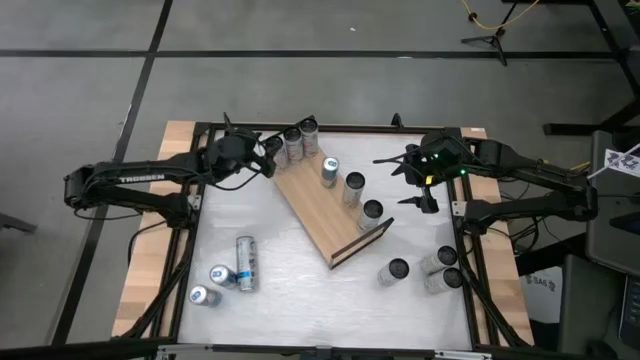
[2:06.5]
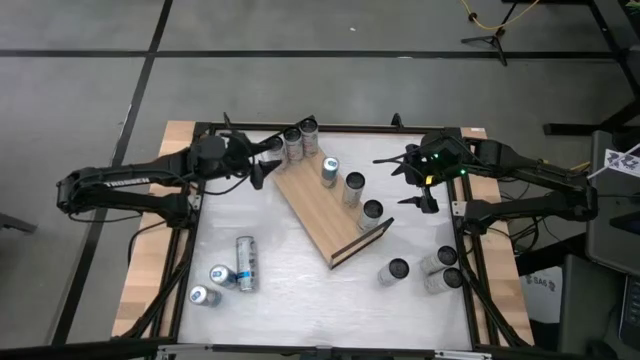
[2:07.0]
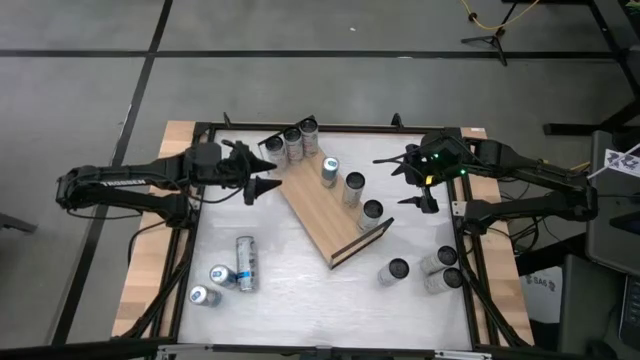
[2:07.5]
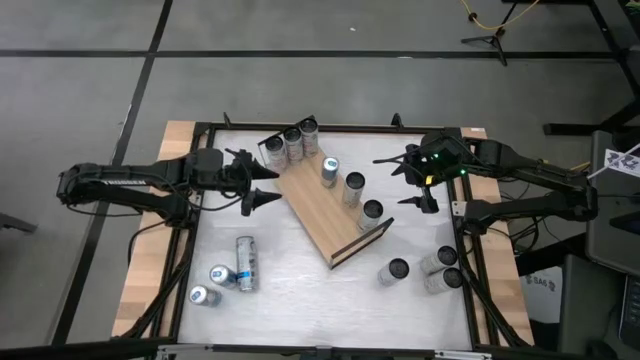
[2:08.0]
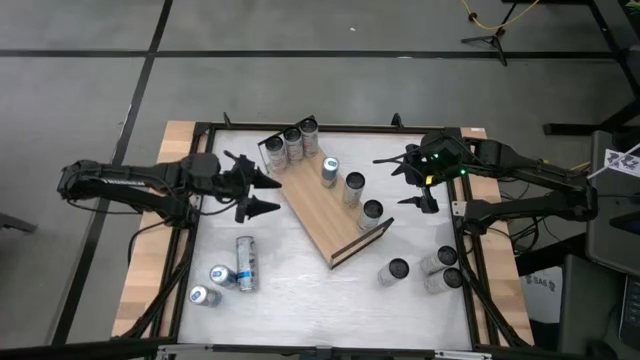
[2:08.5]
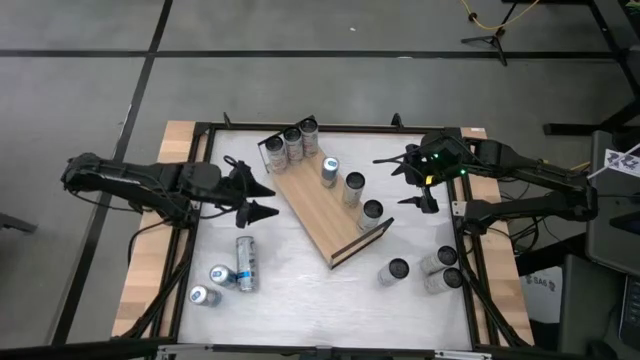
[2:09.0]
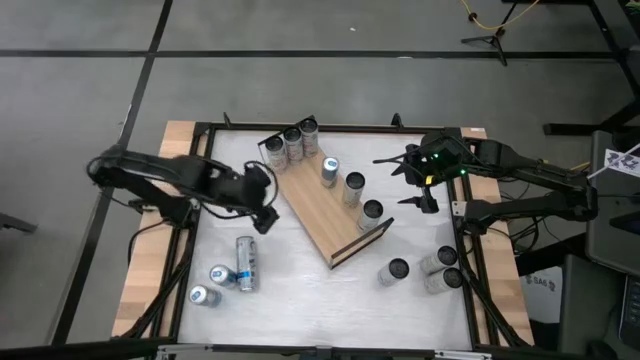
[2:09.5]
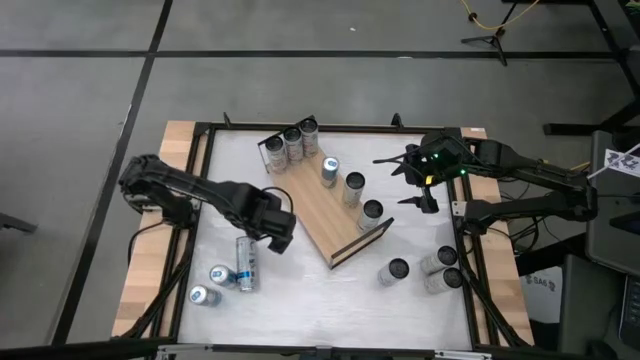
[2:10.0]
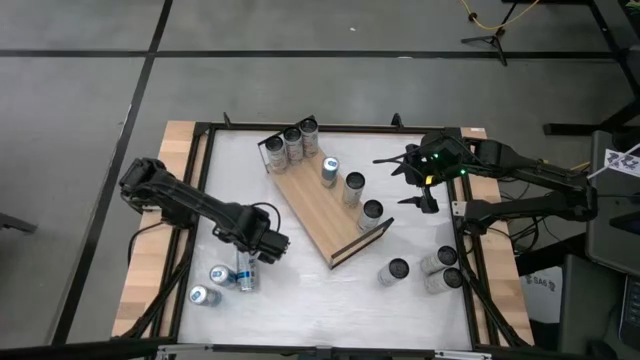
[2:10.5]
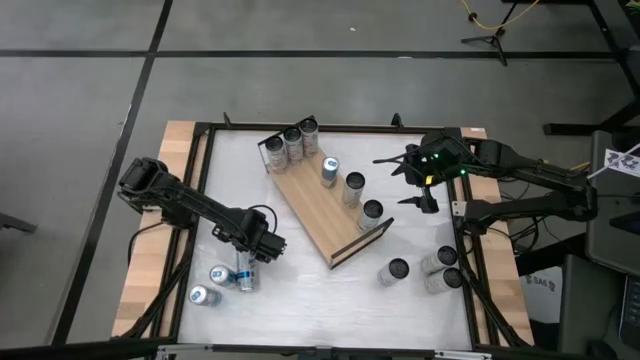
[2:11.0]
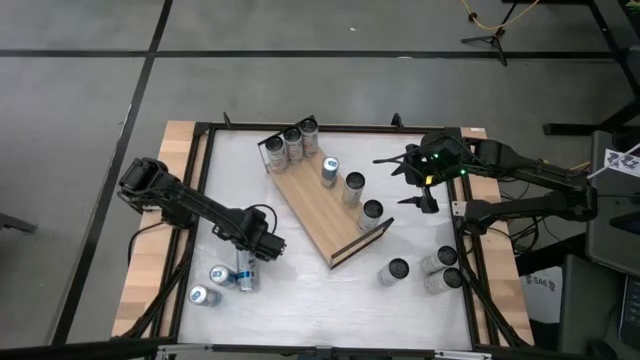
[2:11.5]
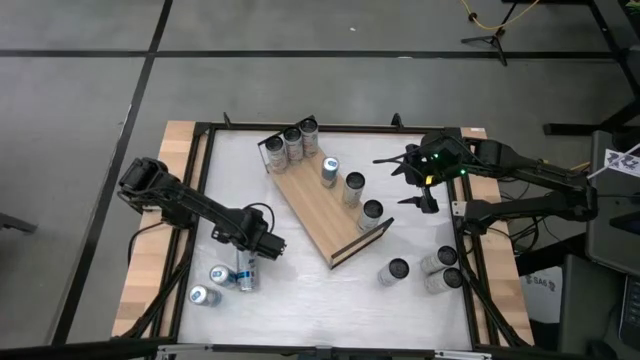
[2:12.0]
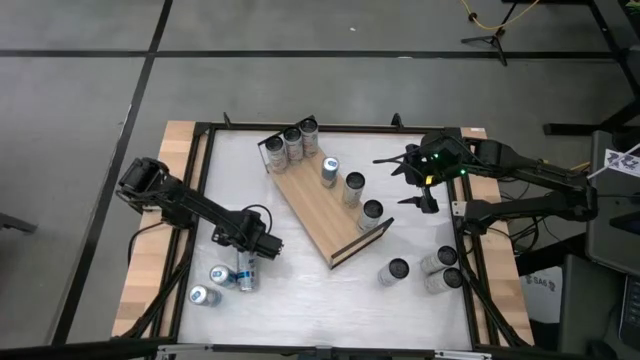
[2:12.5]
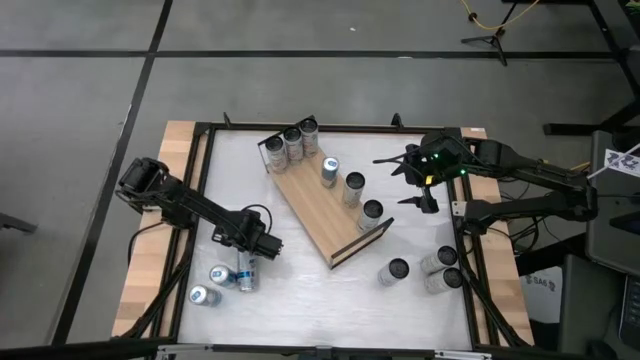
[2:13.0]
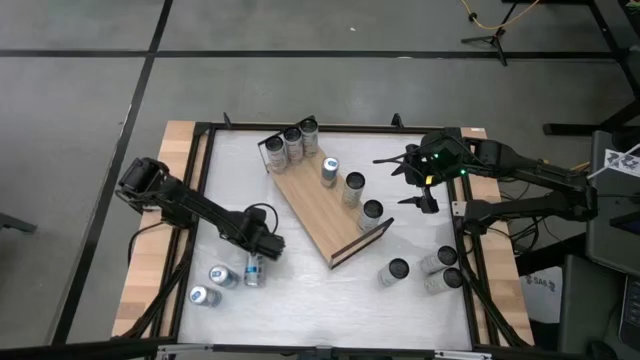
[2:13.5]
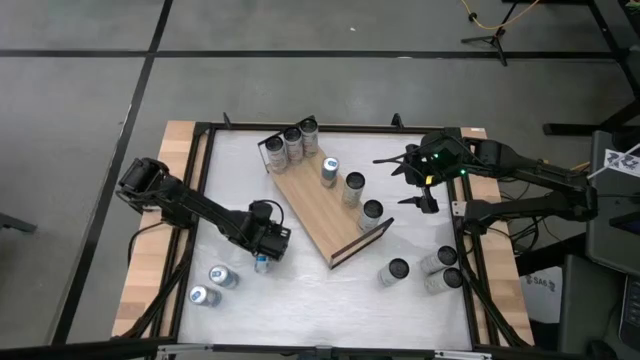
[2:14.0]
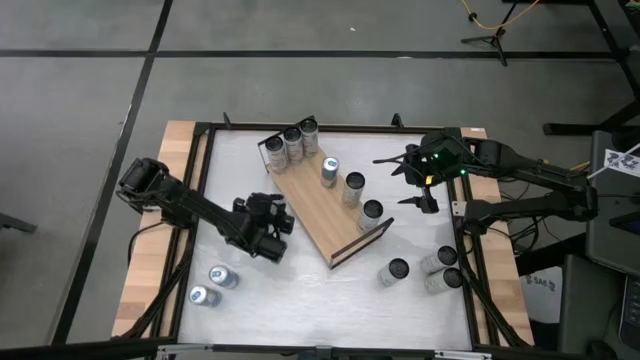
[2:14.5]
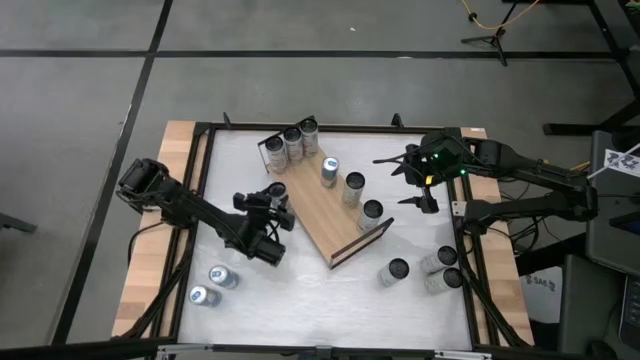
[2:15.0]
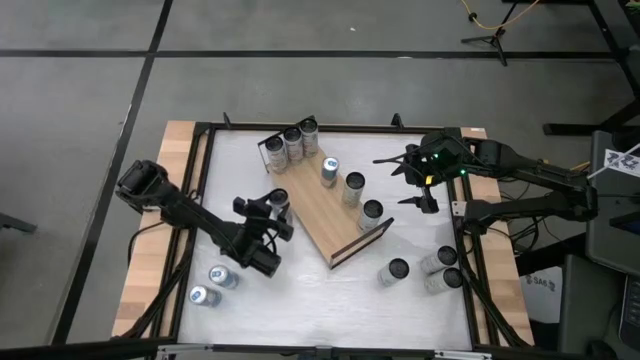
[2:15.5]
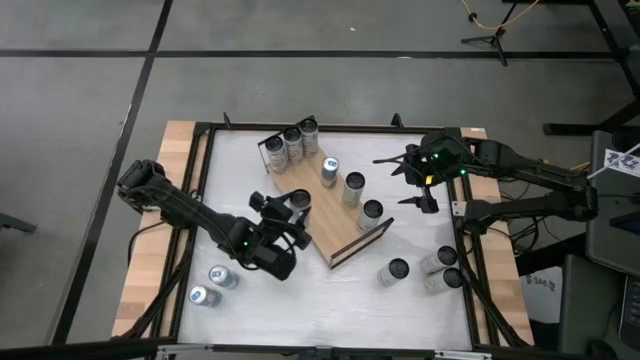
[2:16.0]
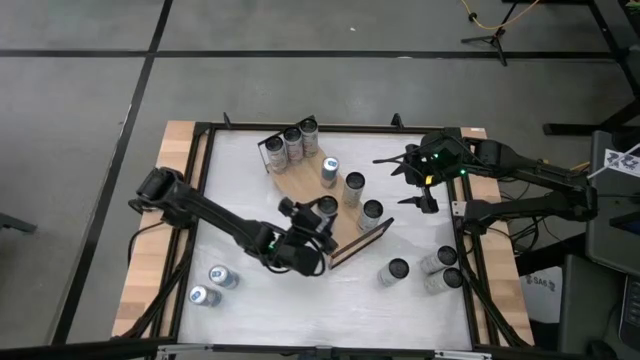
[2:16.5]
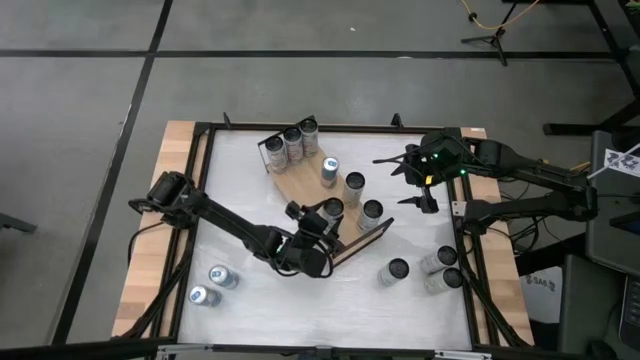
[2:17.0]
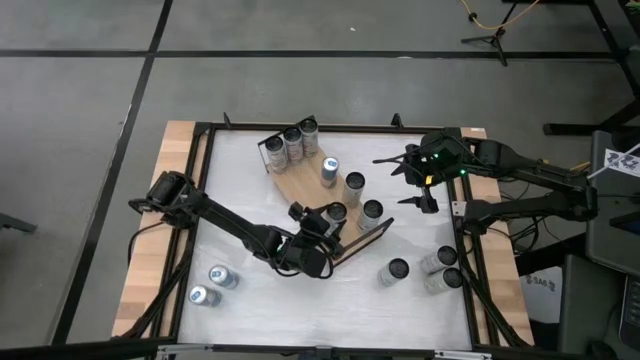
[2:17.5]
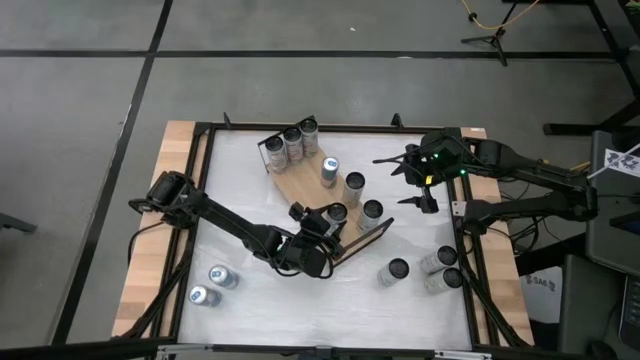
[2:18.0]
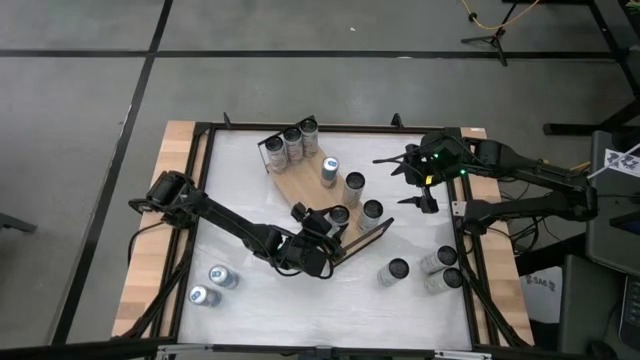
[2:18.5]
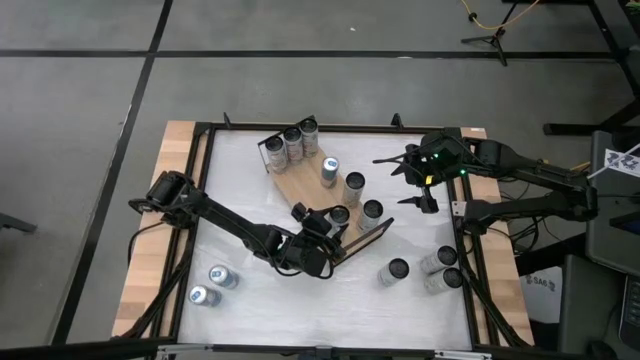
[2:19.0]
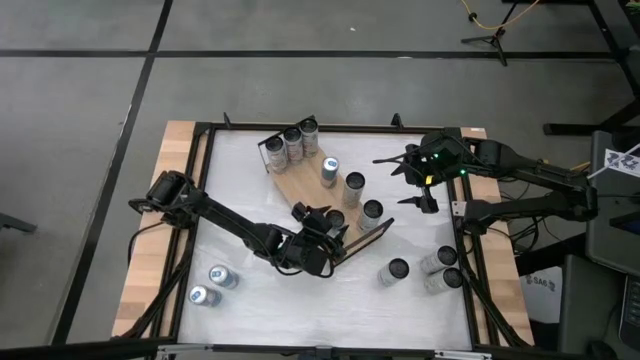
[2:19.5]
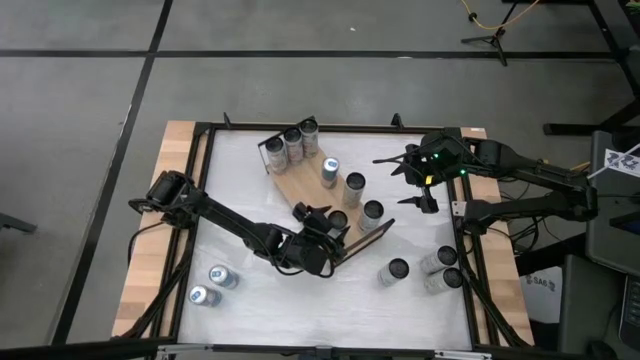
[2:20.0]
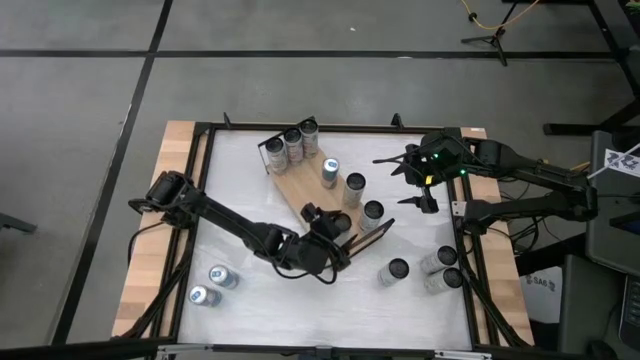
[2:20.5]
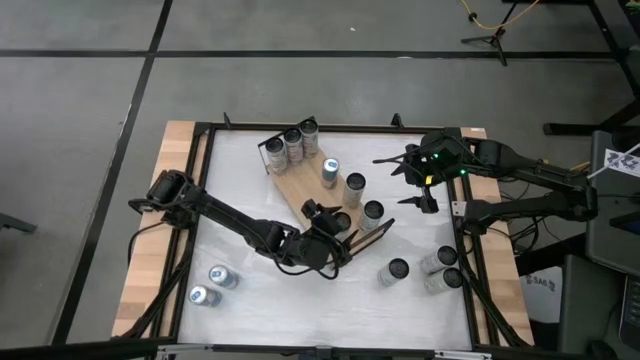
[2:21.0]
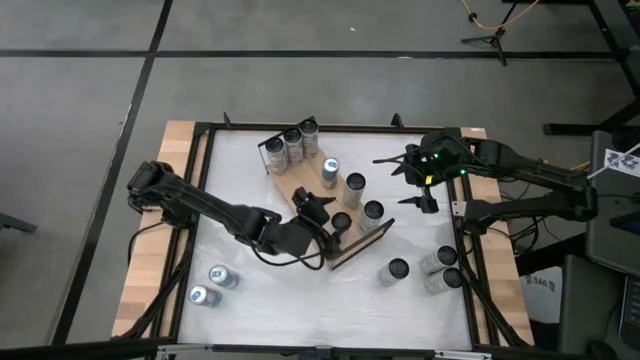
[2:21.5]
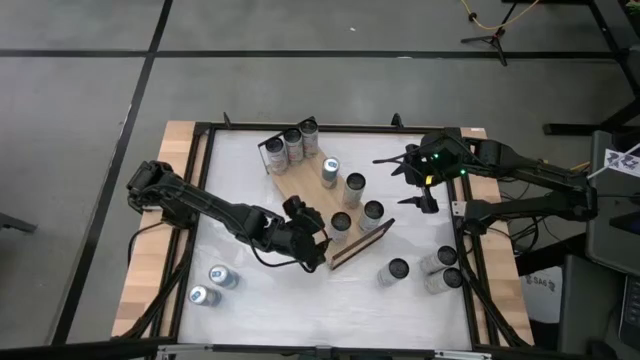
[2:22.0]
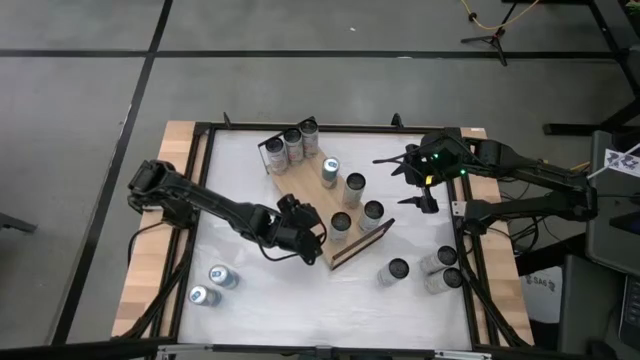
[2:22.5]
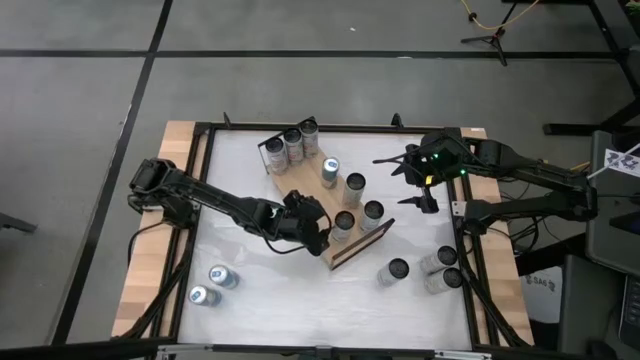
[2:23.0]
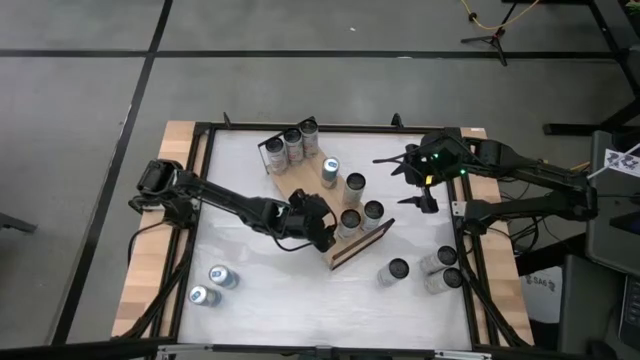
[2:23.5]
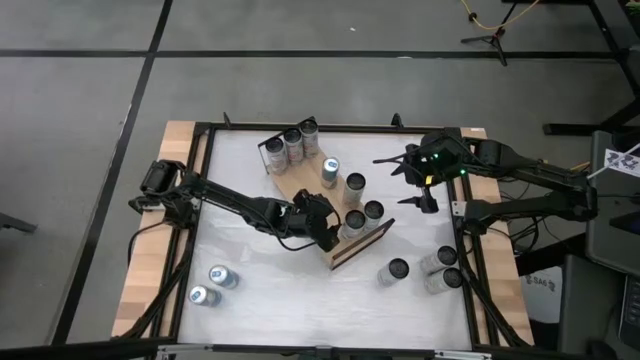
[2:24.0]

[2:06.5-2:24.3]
Task: Place canned beverage on shelf
Put the left white-blue soda can on the shelf and align with the other white-blue soda can

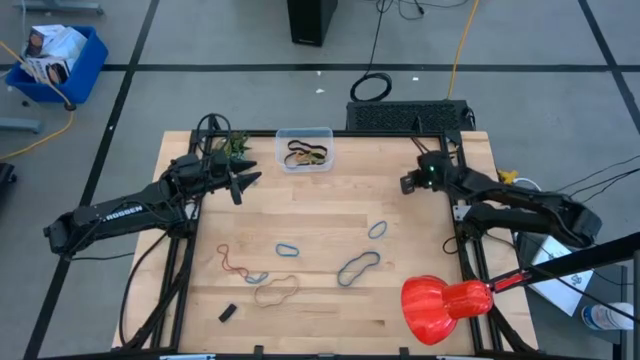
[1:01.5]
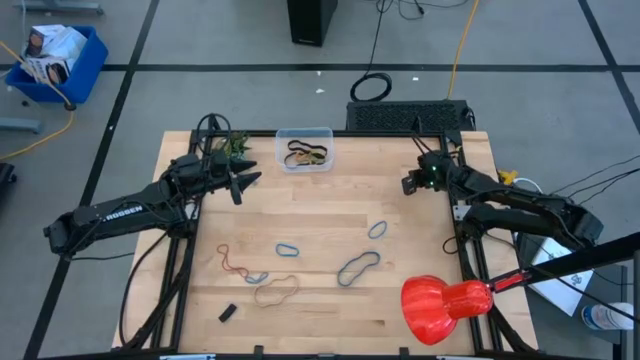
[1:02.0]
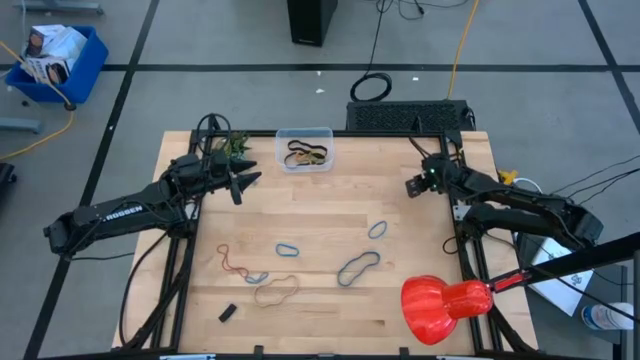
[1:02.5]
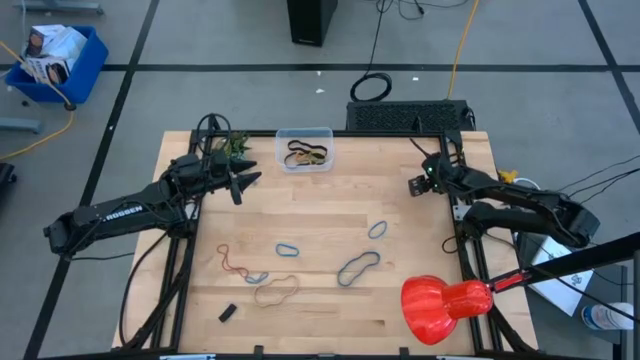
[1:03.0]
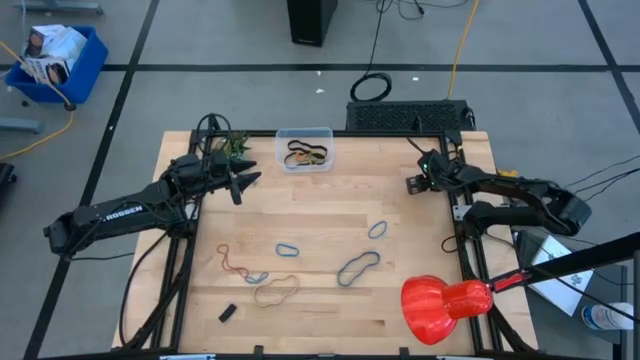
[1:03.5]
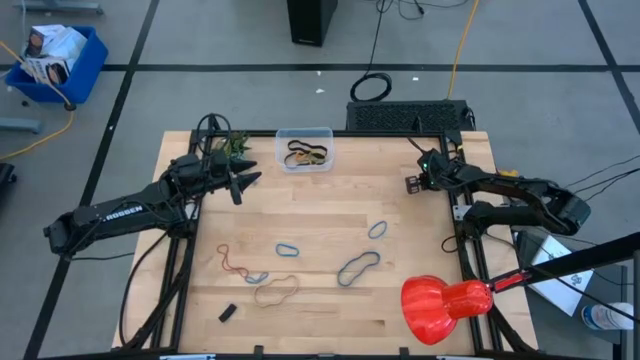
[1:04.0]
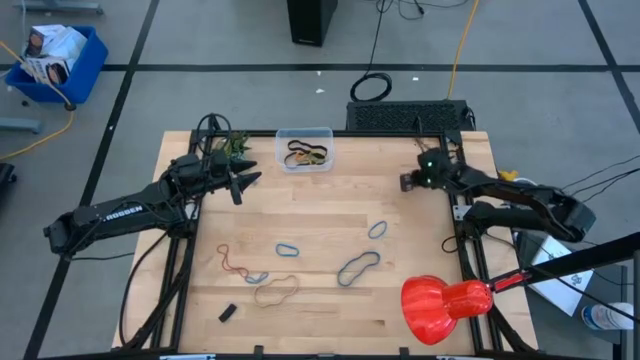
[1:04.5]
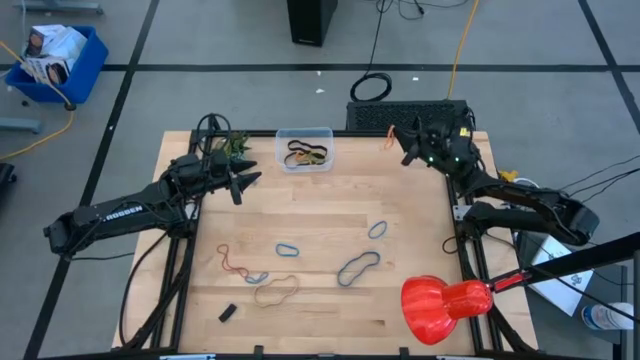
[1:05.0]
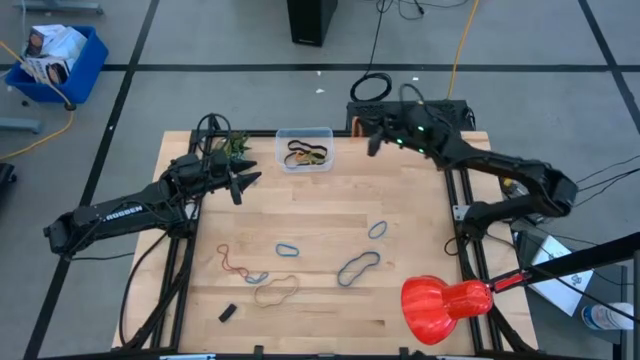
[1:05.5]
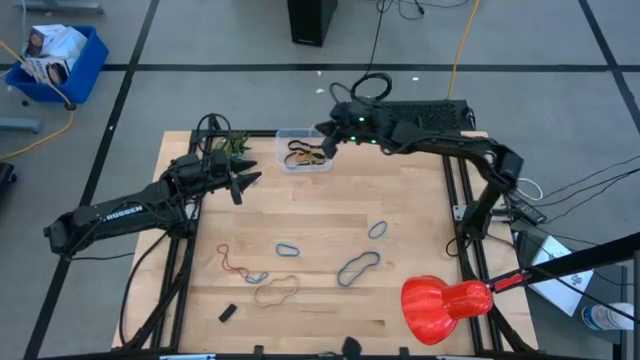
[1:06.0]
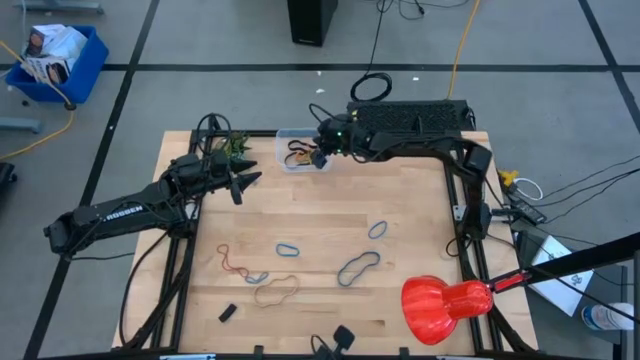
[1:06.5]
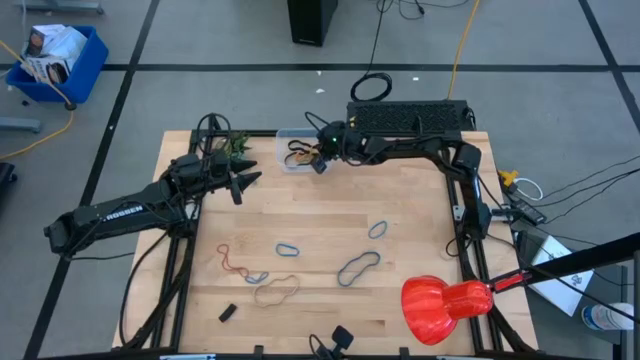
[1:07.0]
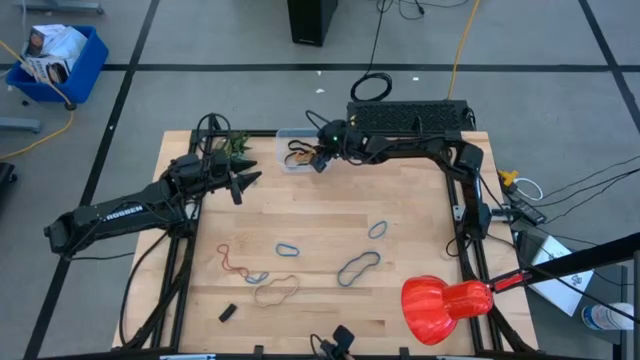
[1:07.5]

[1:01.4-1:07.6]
Task: Pick and place rubber bands into bin
Put the orange rubber band into the transparent bin
